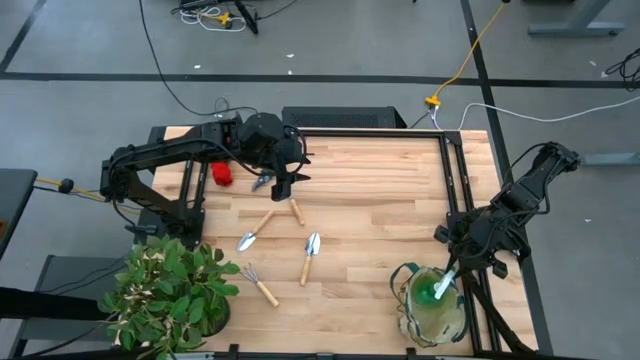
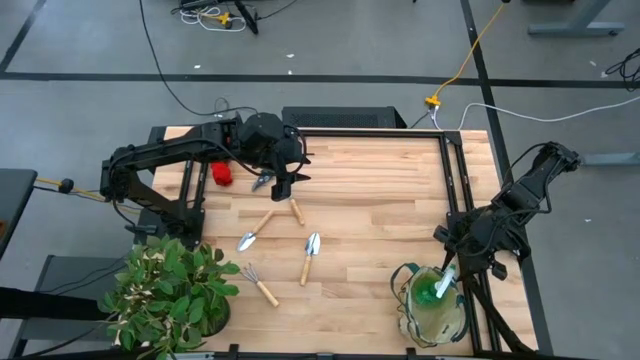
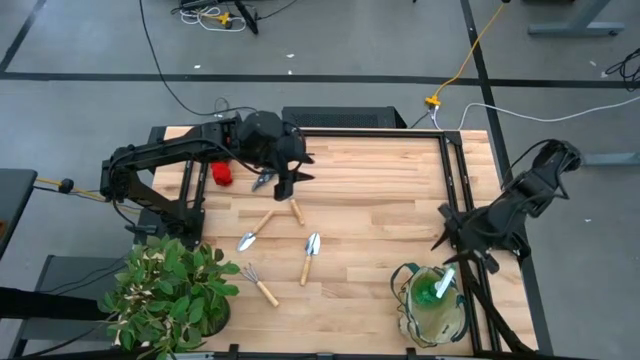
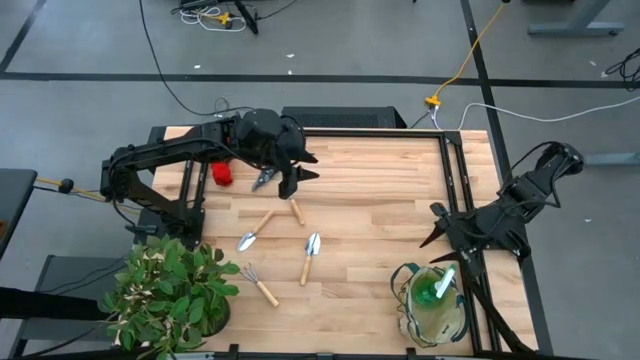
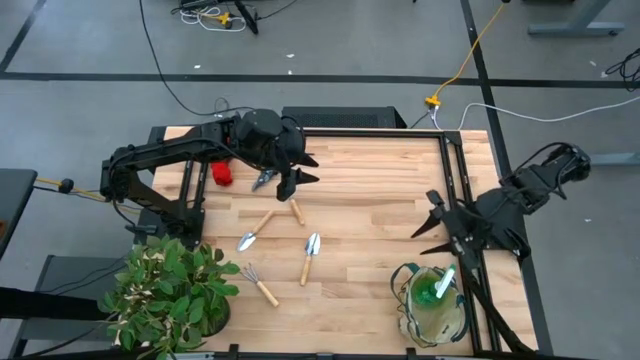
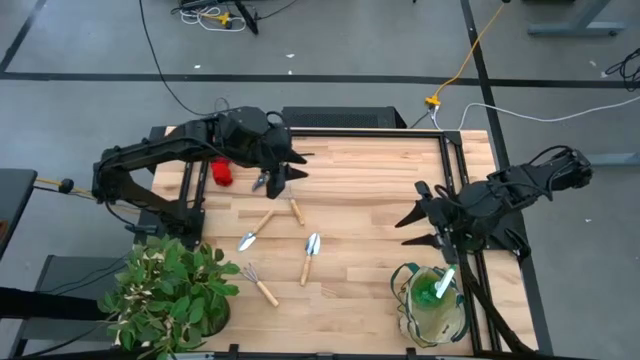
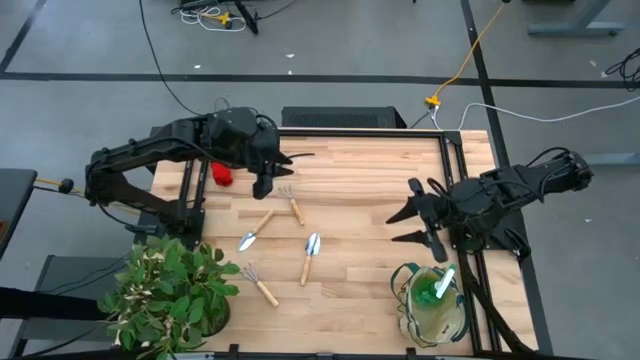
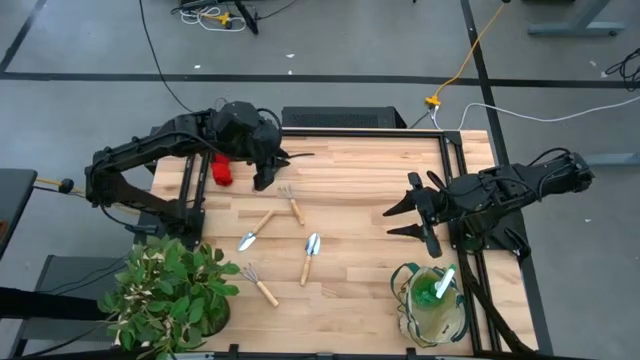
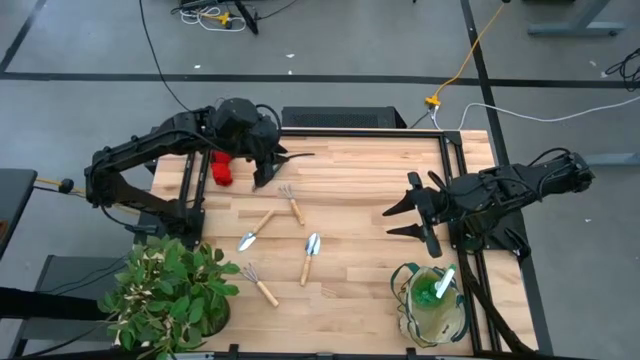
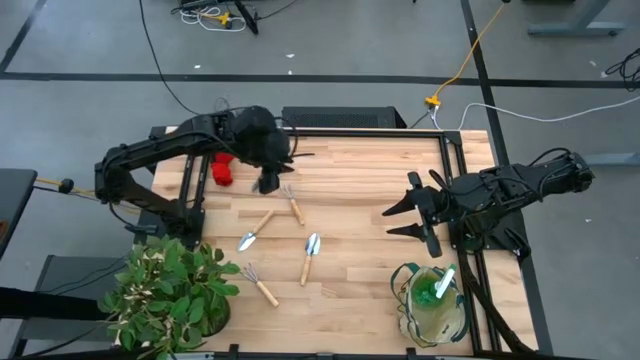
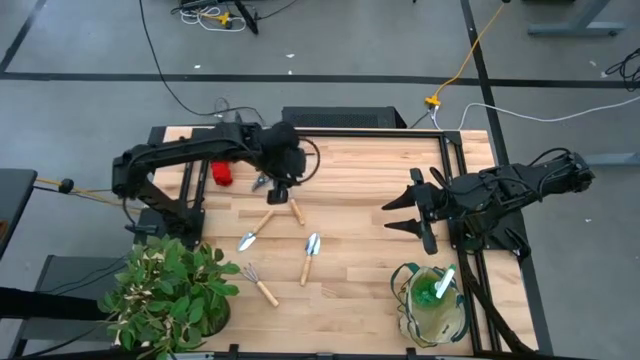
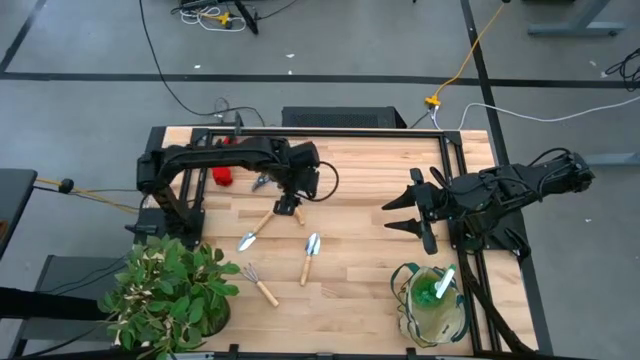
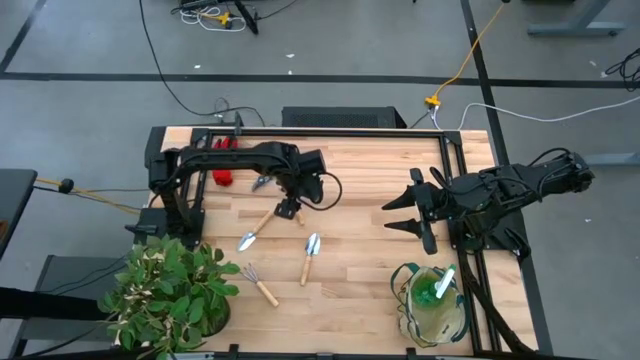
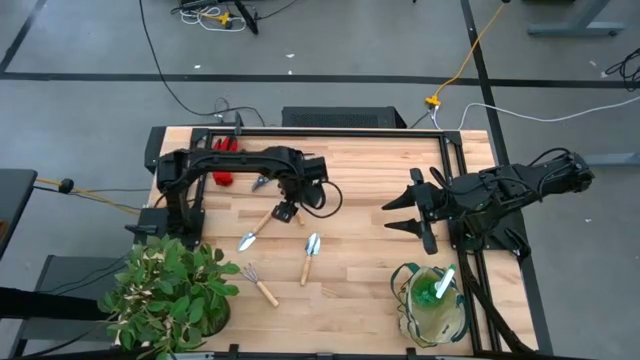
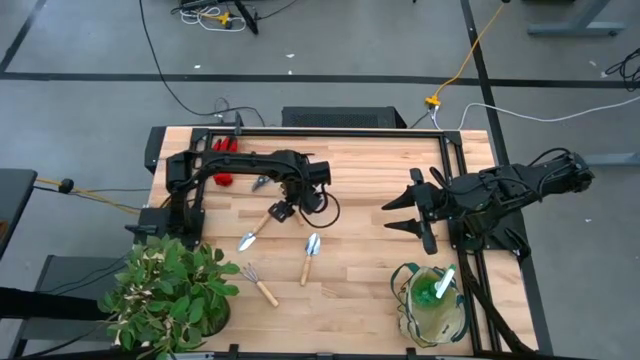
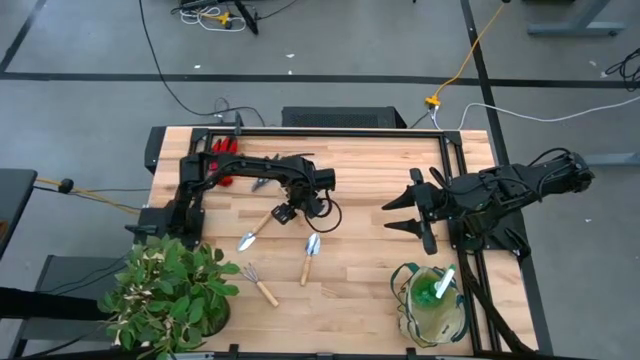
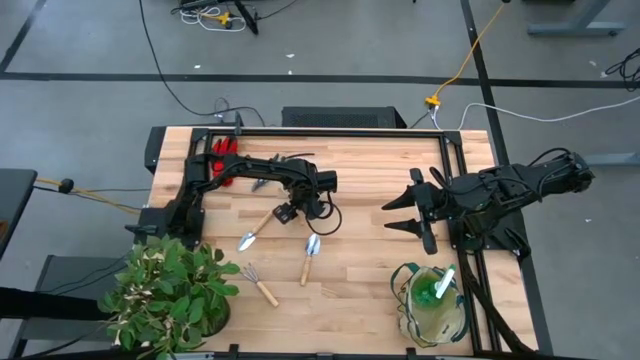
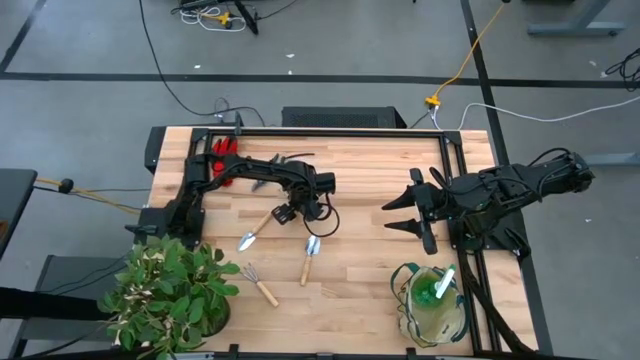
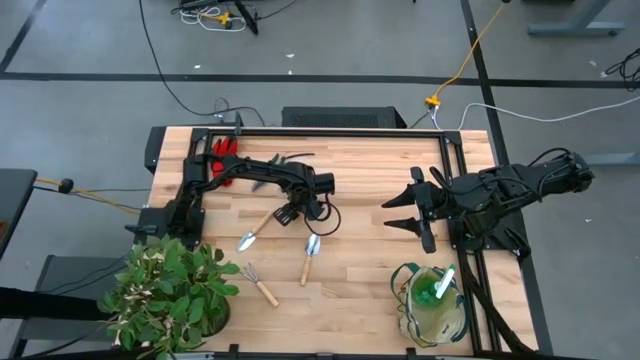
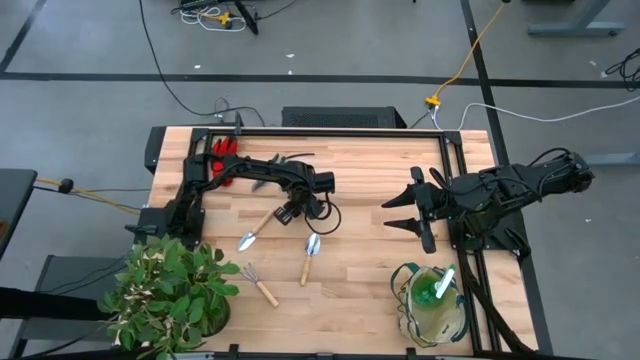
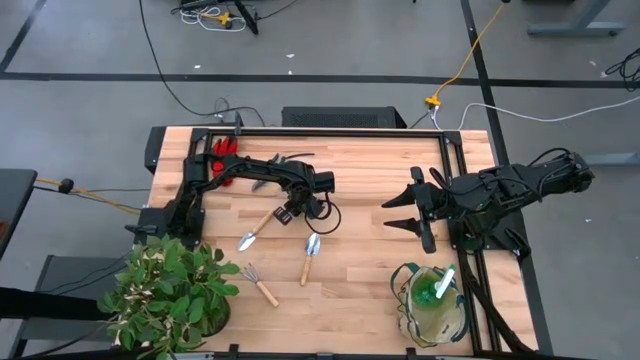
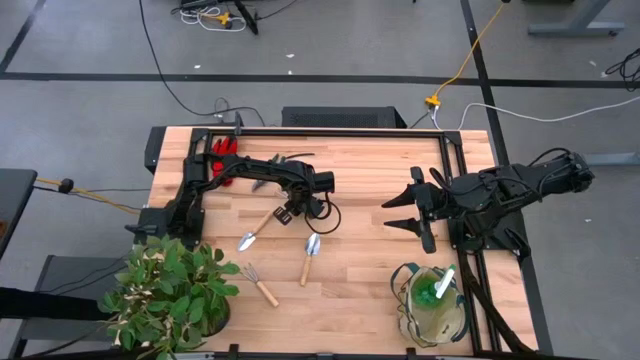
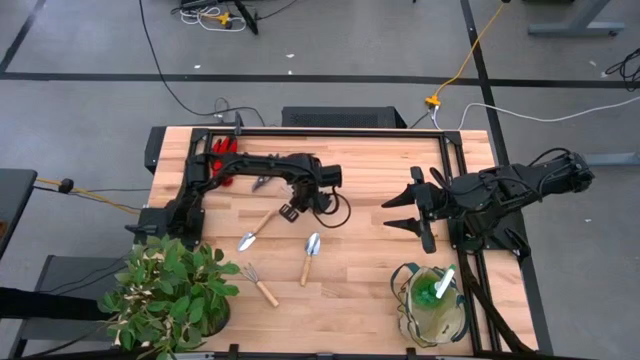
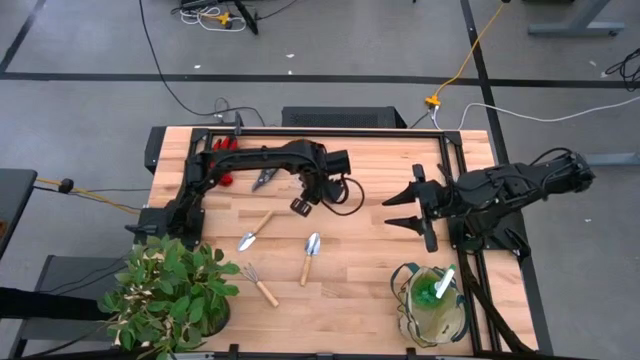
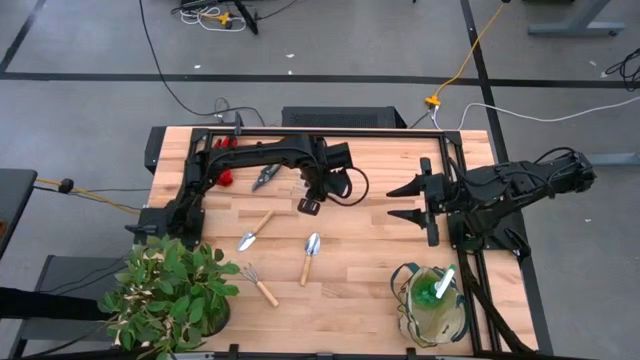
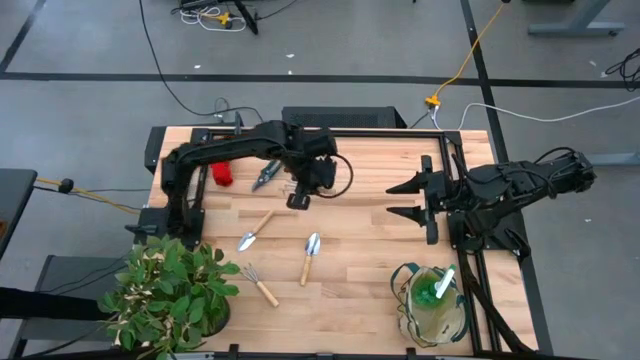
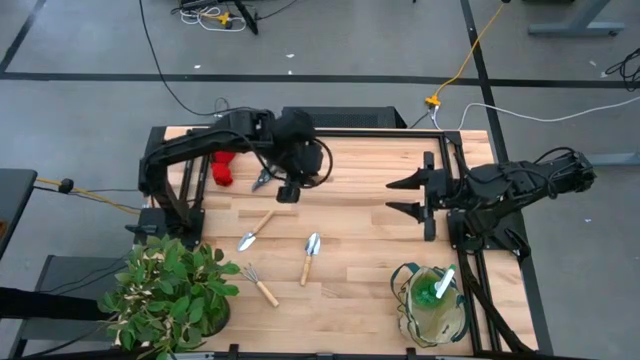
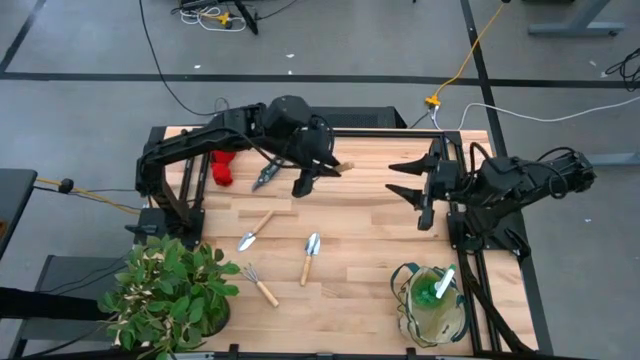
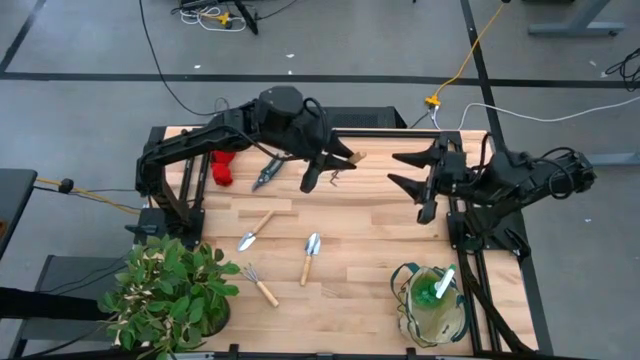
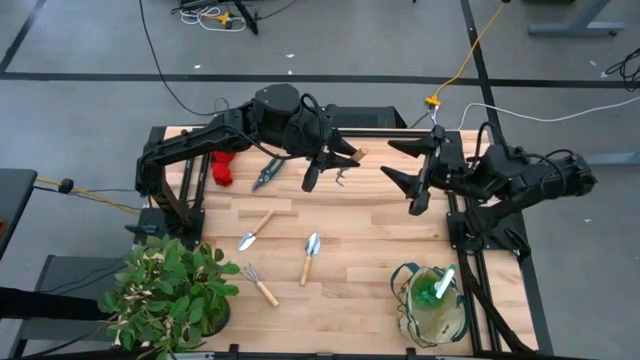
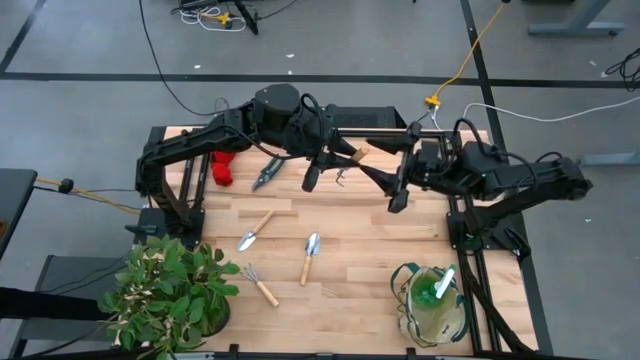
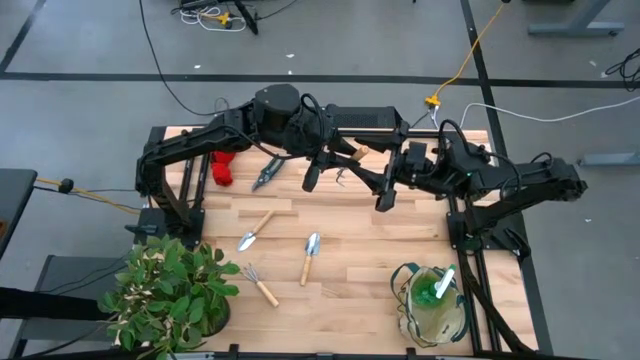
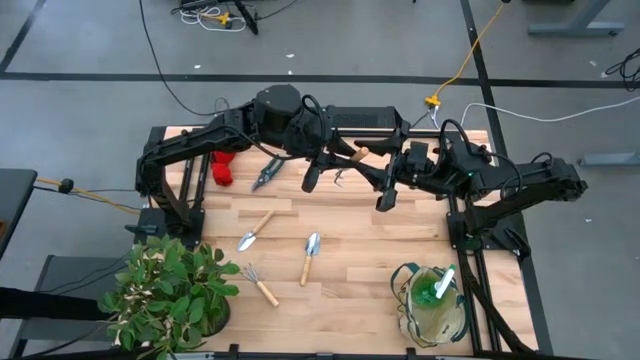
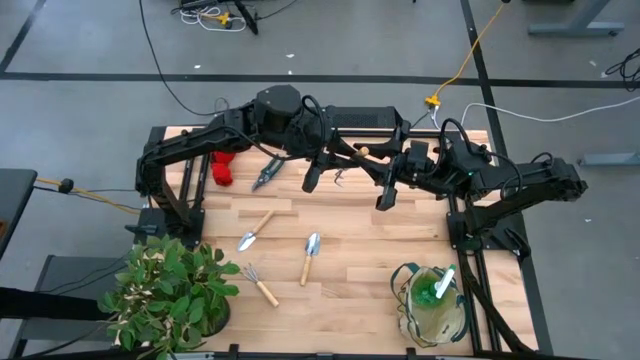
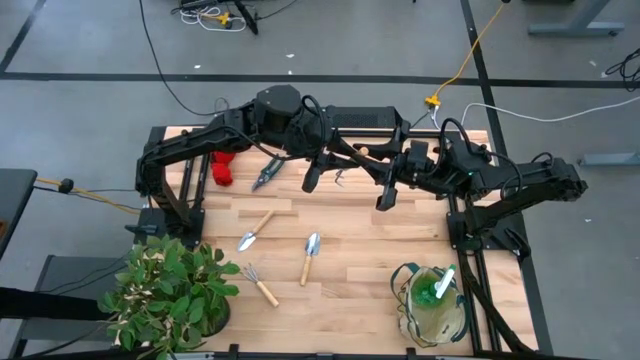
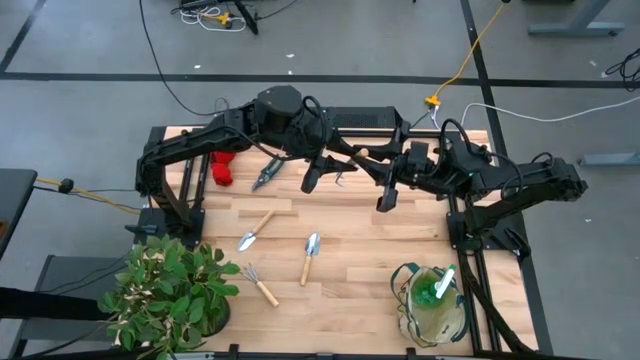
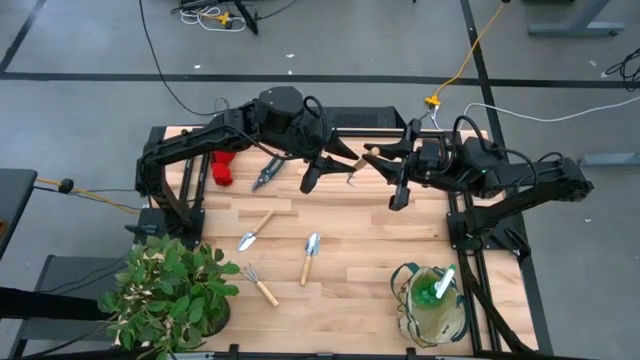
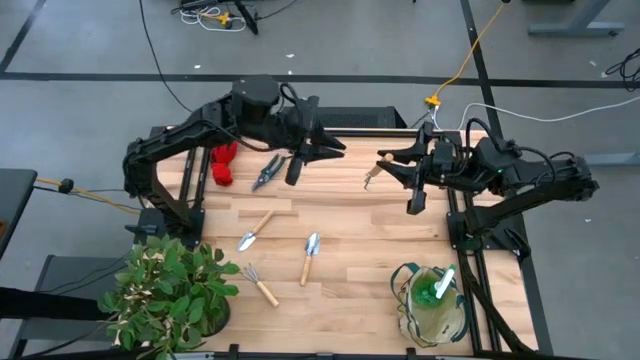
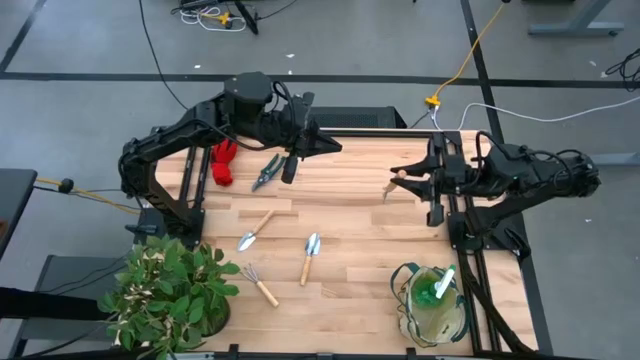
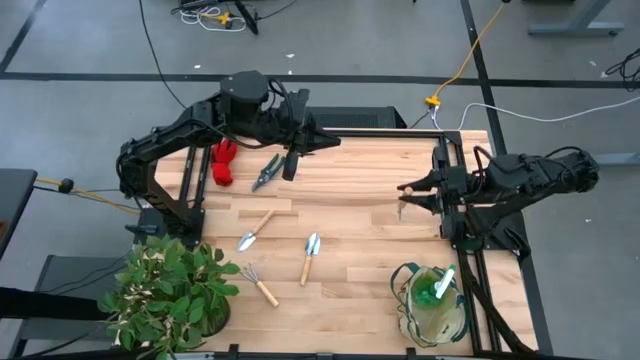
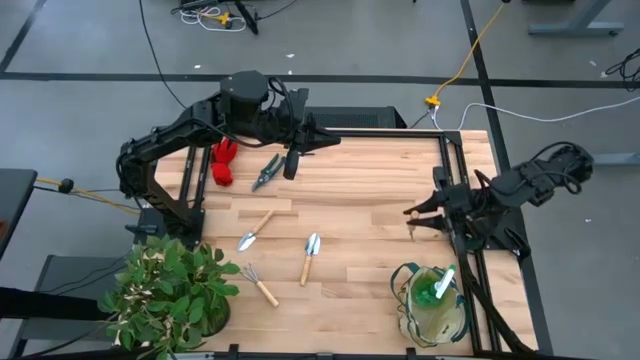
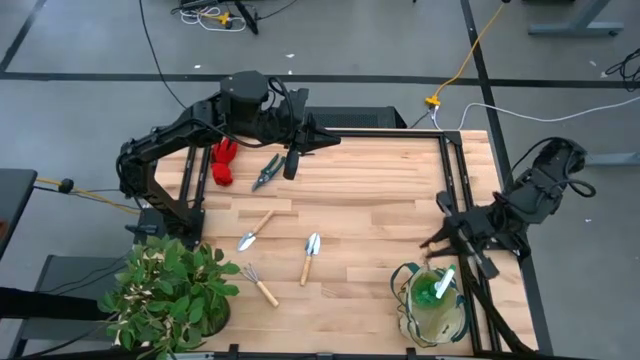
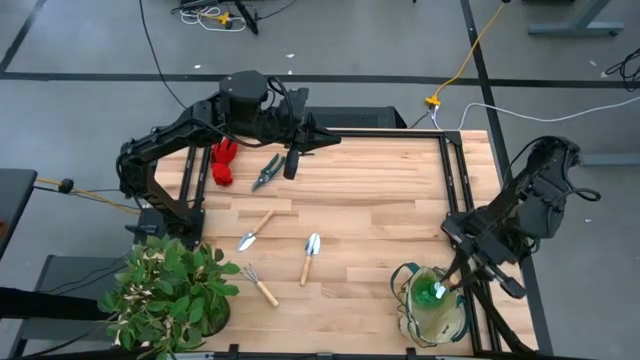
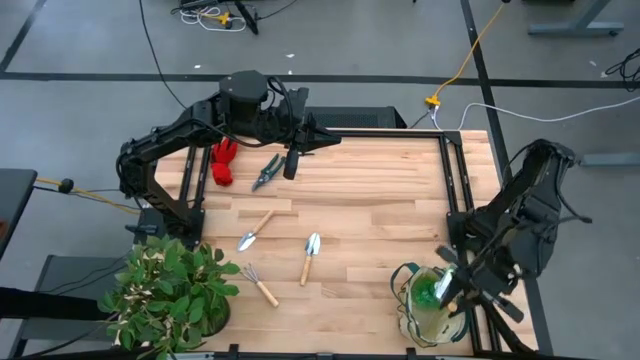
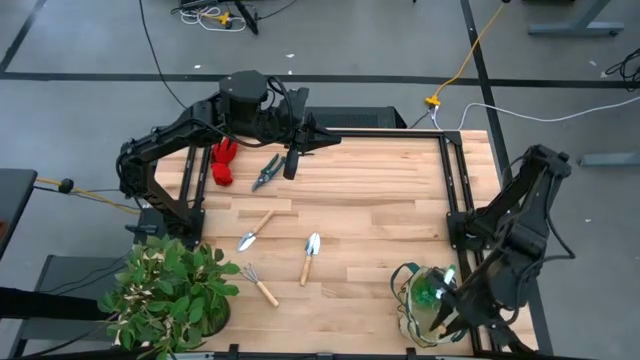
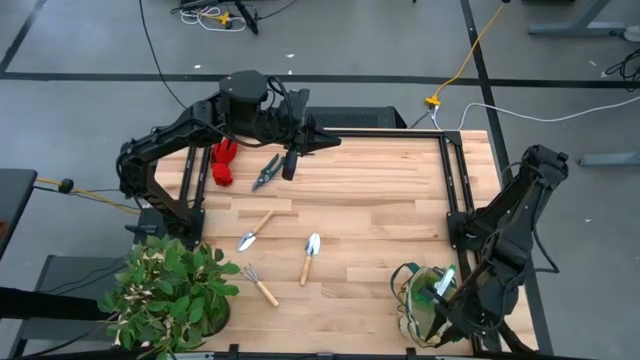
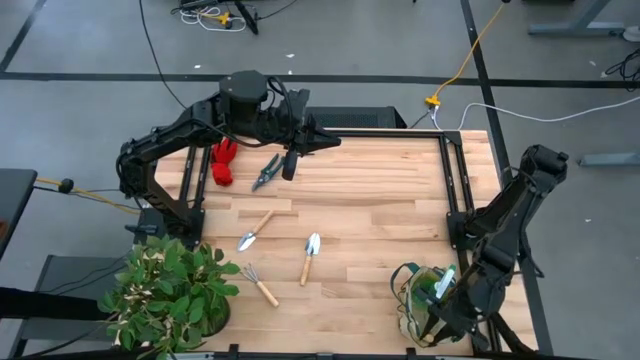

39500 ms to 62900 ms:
Task: Pick & Place Garden tools in Gardening bag
Put the top brown hand rake into the white gardening bag
